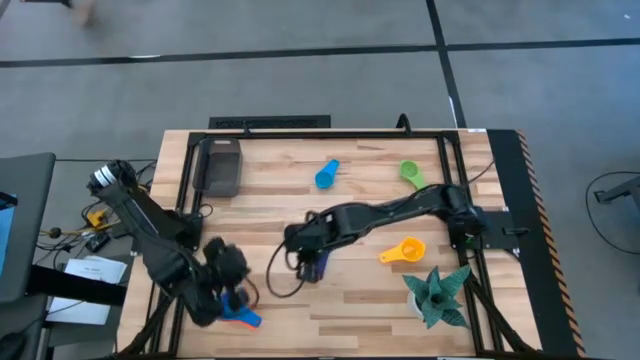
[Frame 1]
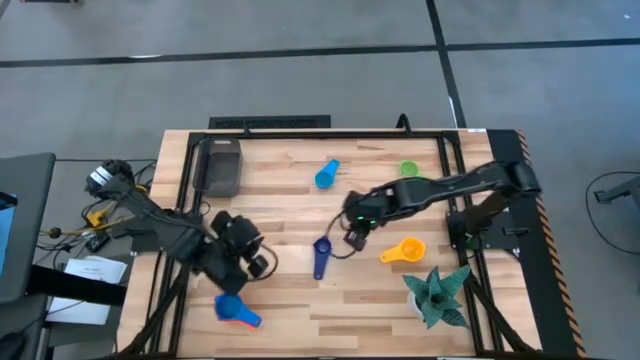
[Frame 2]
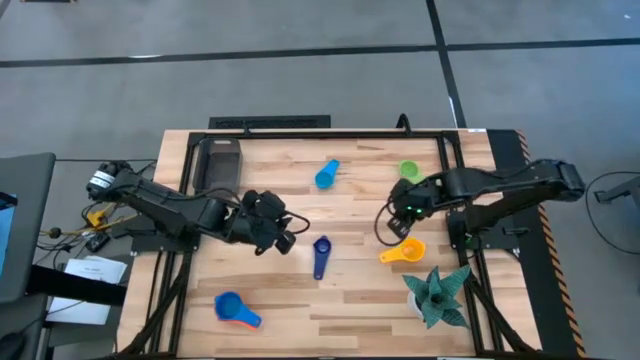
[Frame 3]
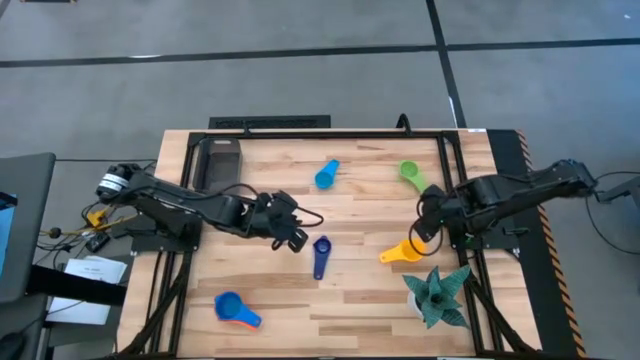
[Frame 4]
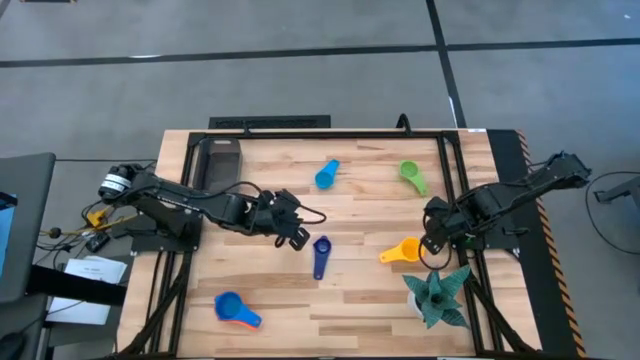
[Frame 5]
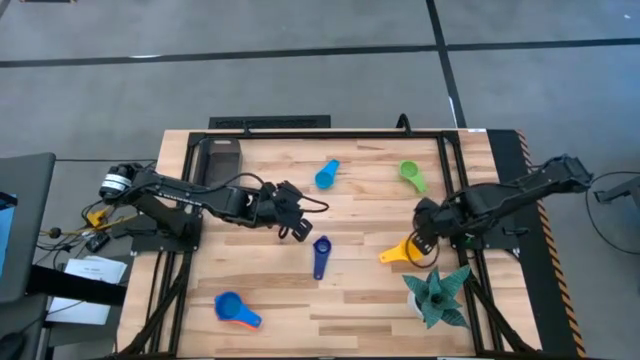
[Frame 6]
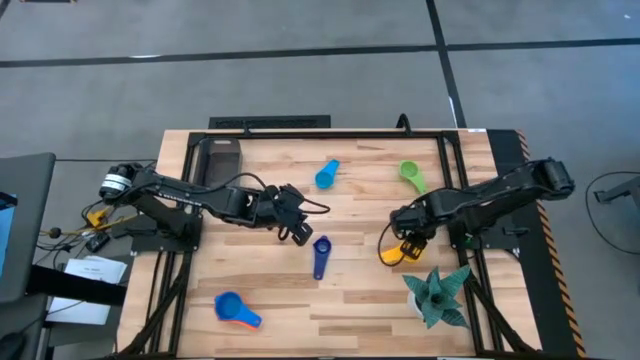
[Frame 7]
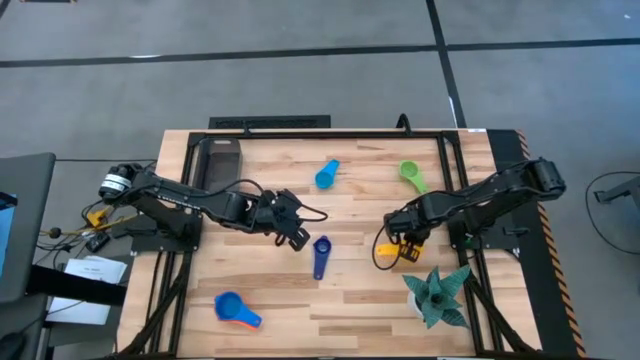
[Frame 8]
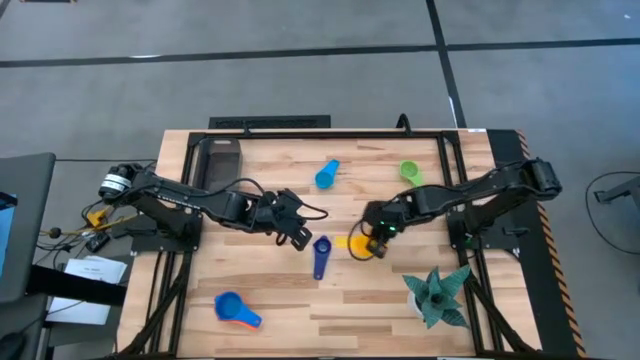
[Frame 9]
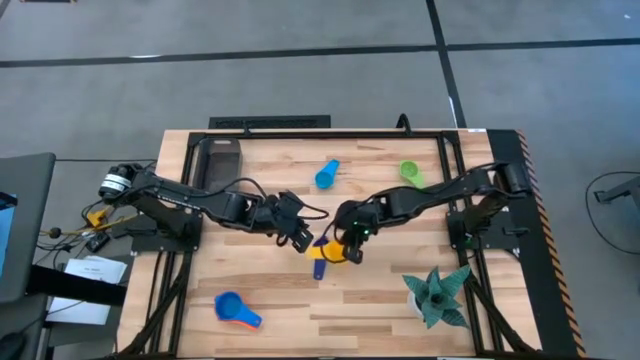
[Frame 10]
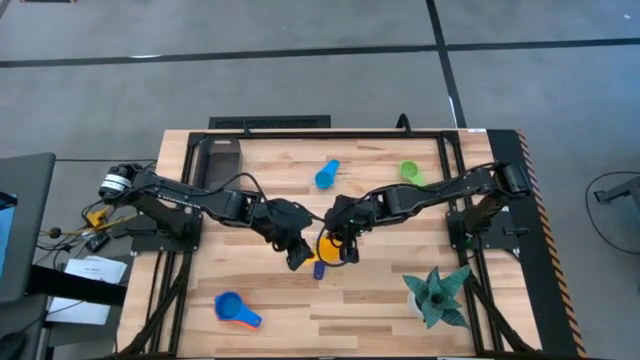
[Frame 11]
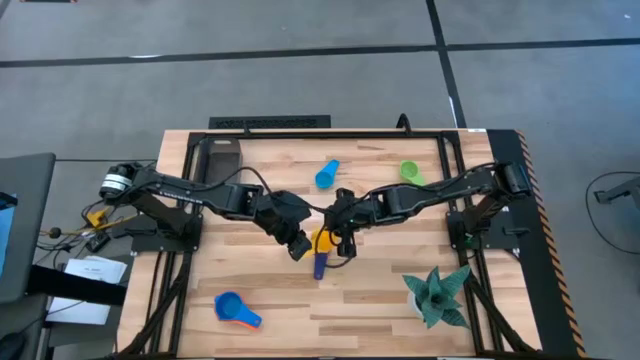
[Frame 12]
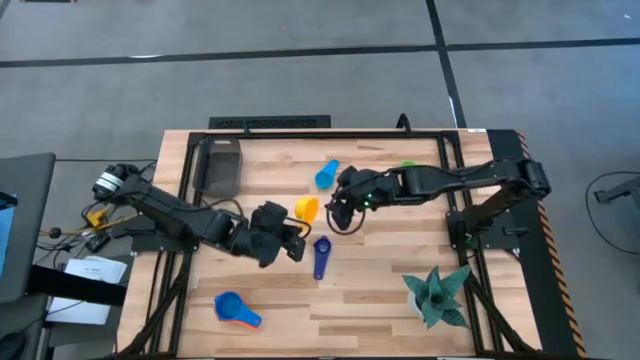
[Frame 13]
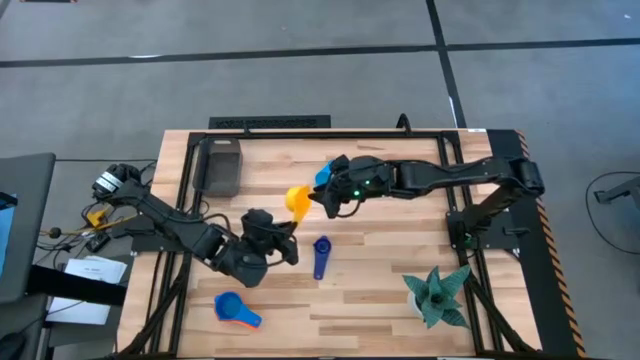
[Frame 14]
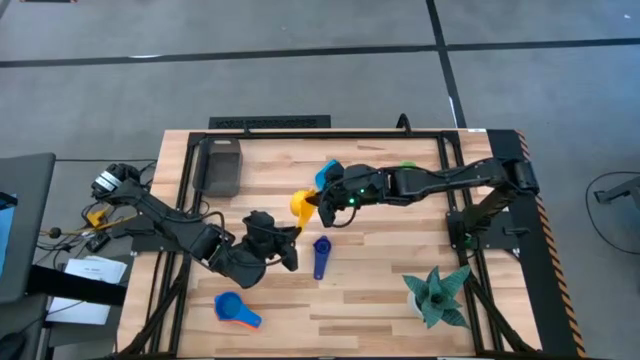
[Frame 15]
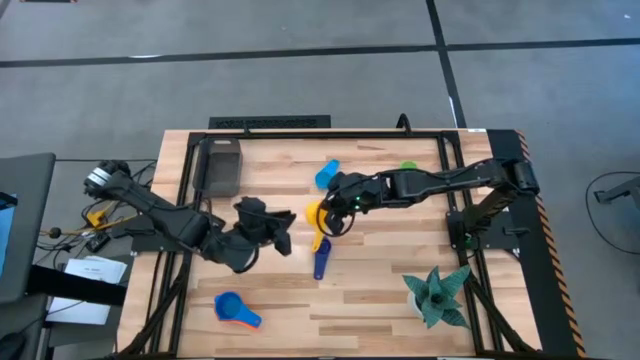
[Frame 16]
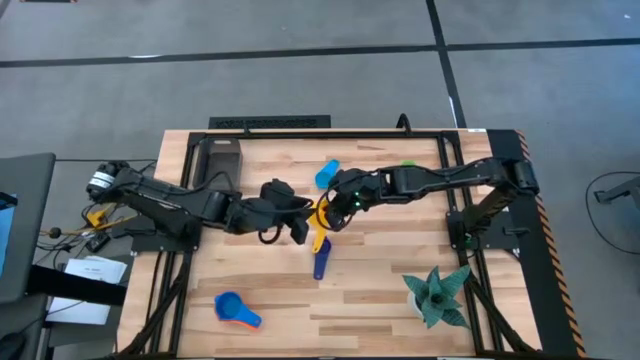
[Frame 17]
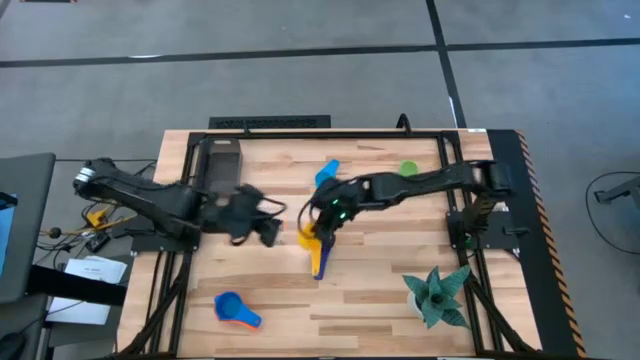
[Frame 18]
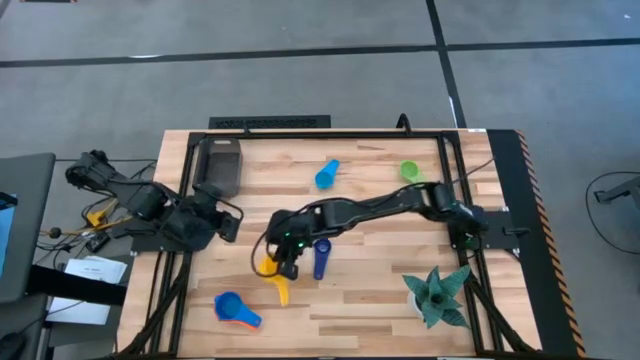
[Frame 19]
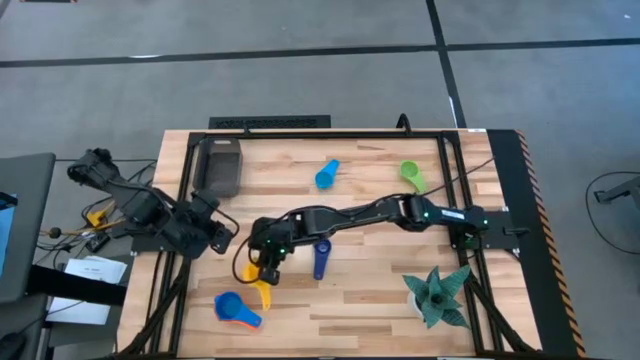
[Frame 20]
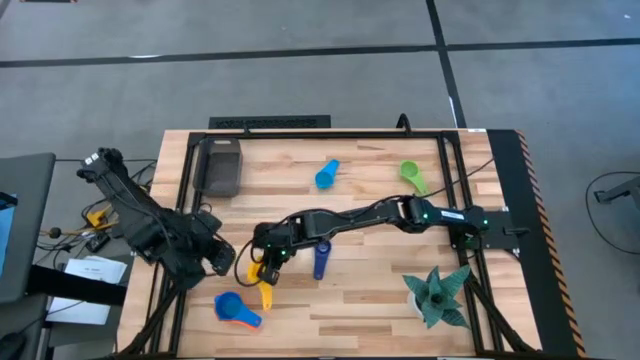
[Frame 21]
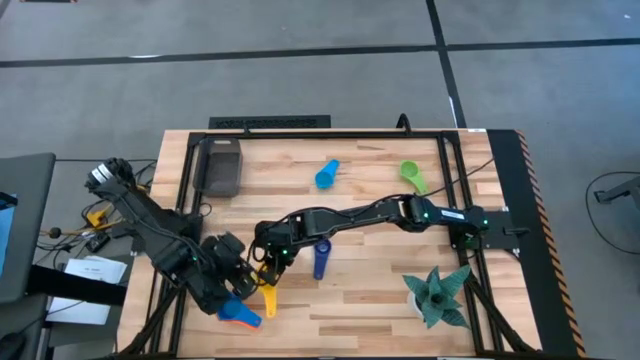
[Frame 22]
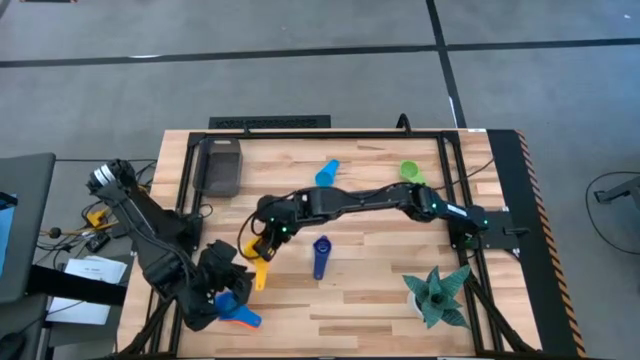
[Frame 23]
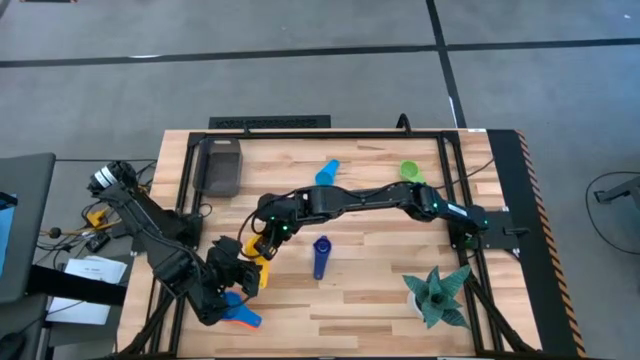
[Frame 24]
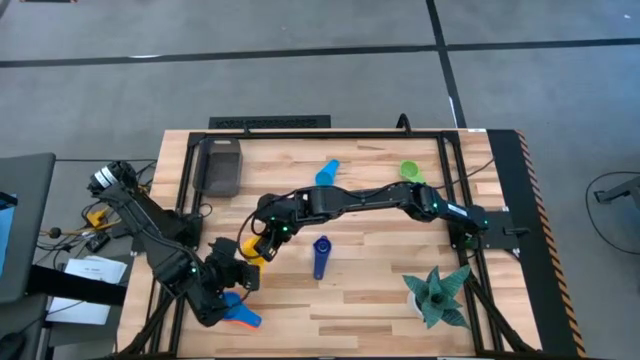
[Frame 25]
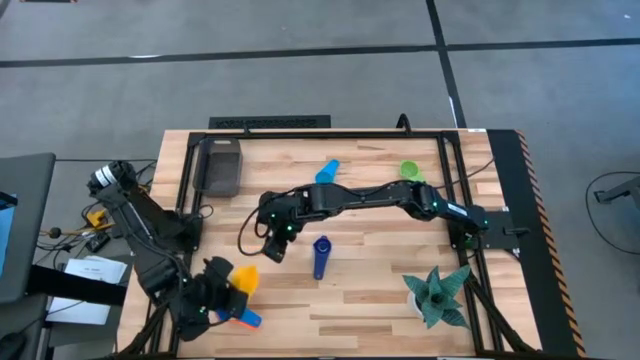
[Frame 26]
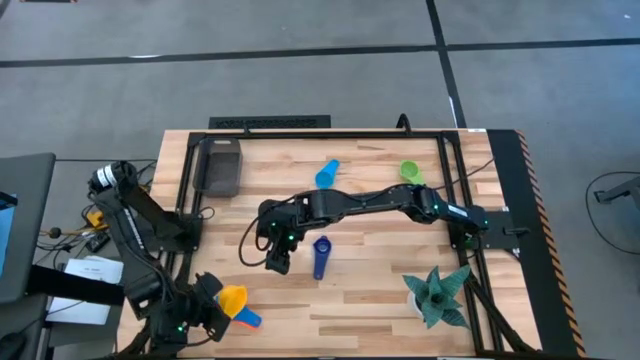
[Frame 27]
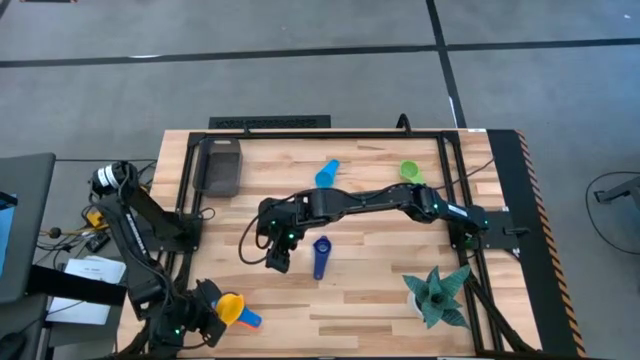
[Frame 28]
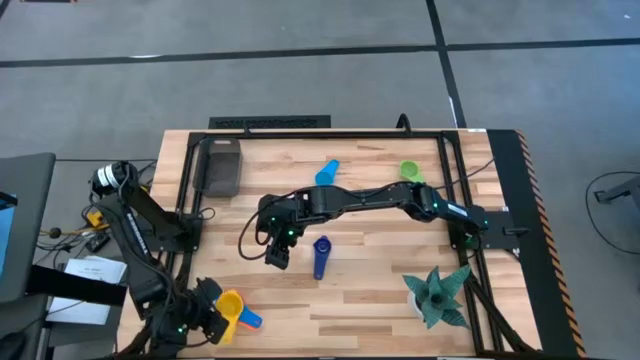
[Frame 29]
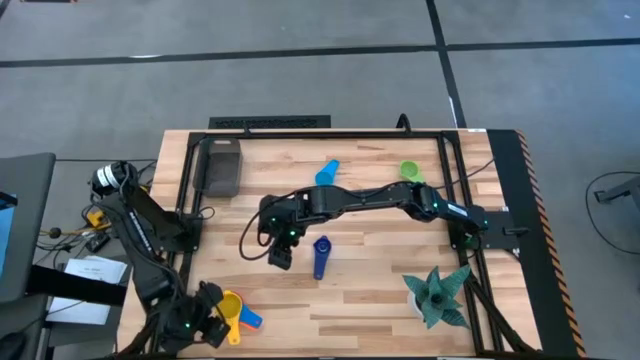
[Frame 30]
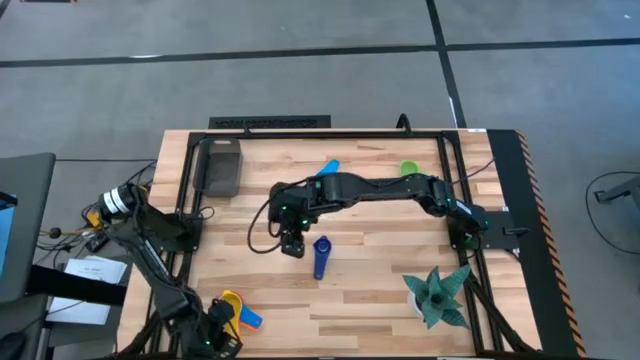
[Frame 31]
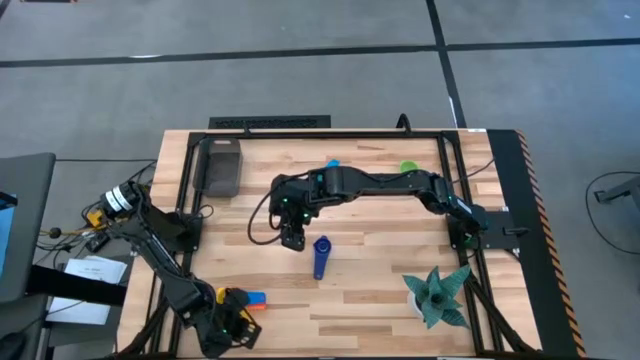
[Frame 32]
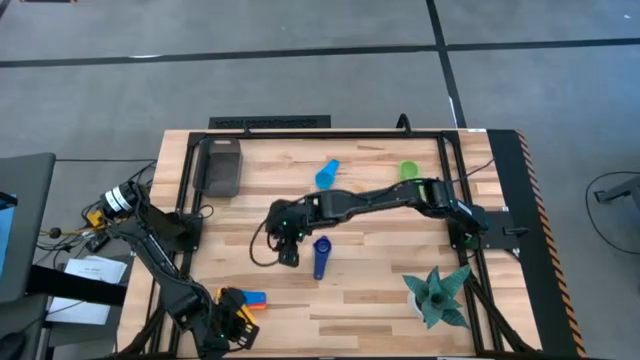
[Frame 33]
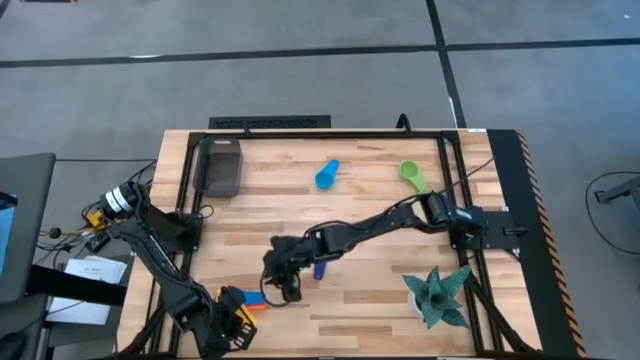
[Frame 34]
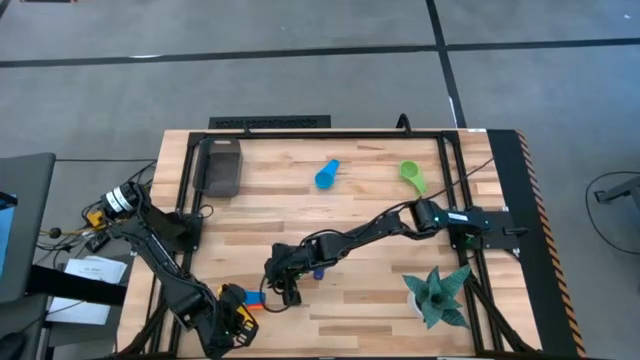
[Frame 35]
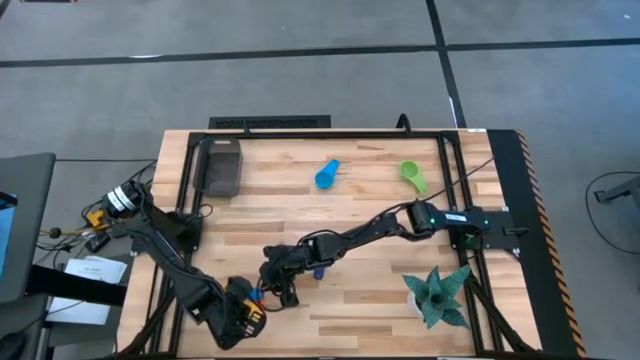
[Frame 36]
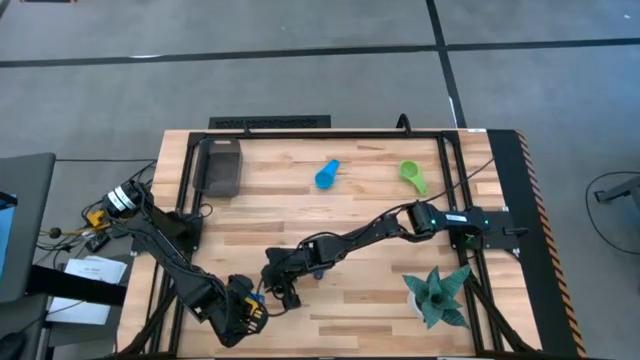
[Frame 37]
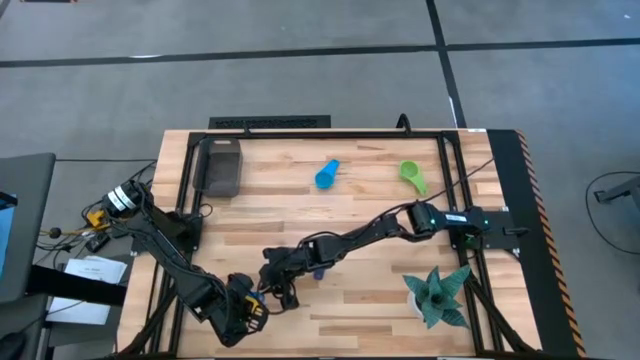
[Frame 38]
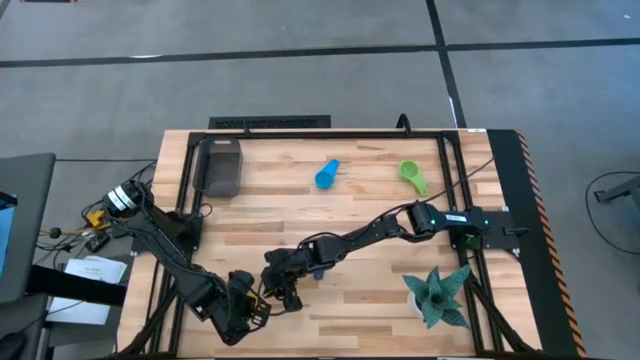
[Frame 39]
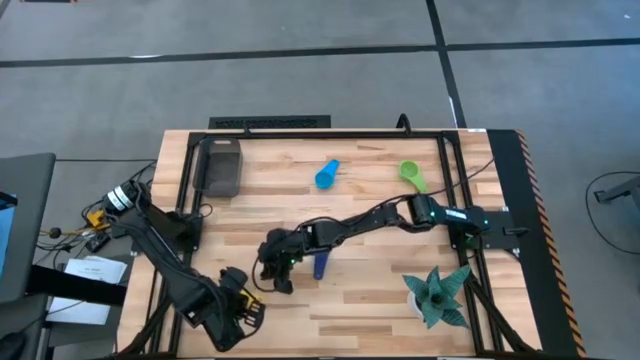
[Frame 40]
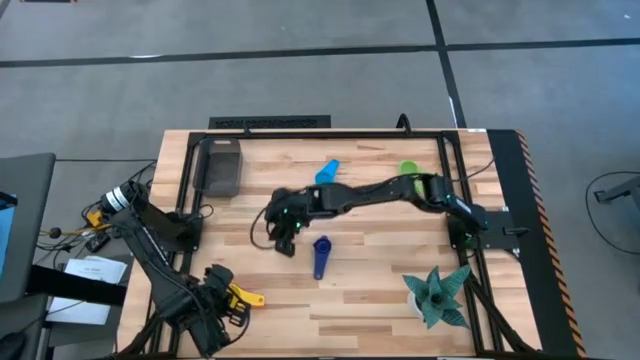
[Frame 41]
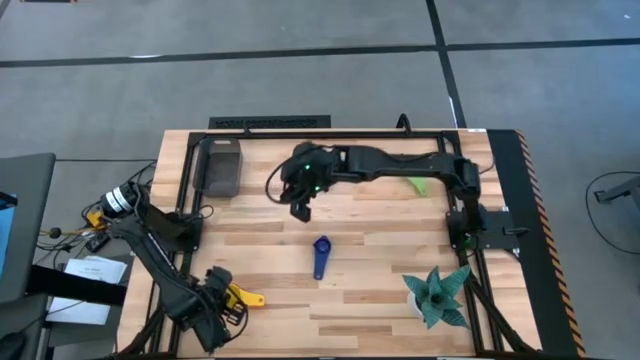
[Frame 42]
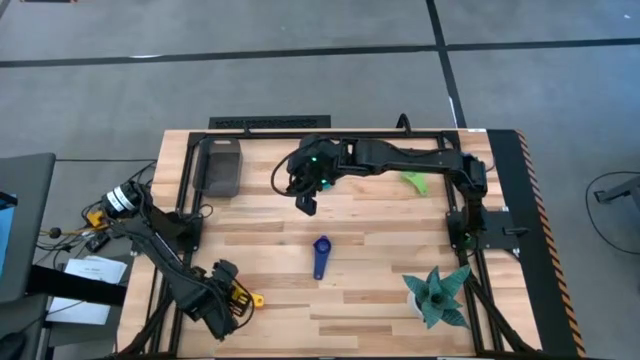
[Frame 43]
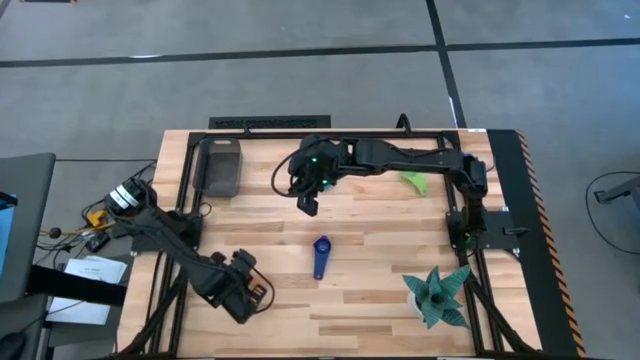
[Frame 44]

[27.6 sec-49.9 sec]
Task: Nest measuring cups in basket
Stack the yellow measuring cup on top of the blue measuring cup

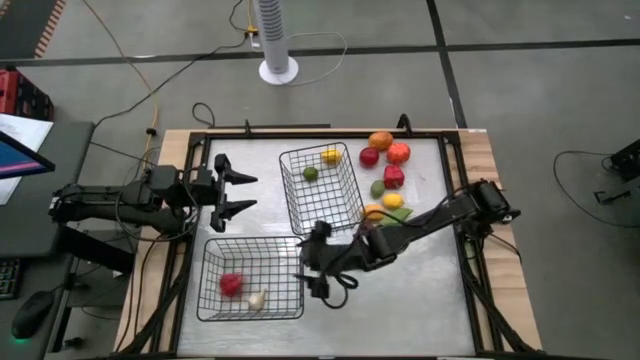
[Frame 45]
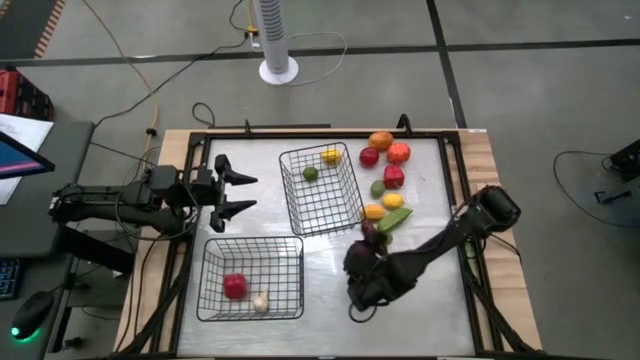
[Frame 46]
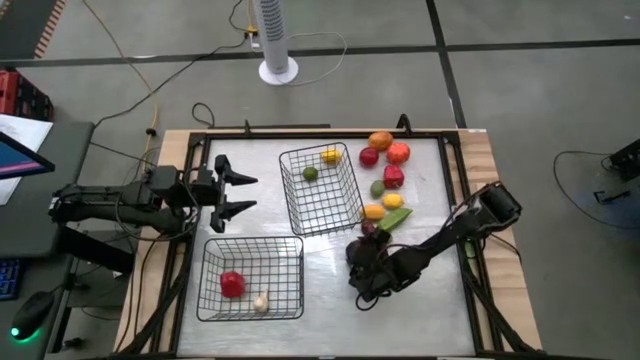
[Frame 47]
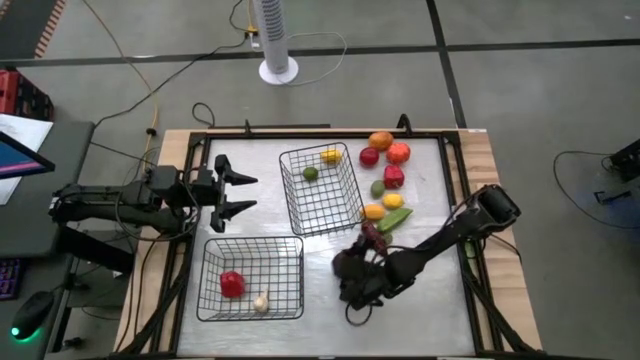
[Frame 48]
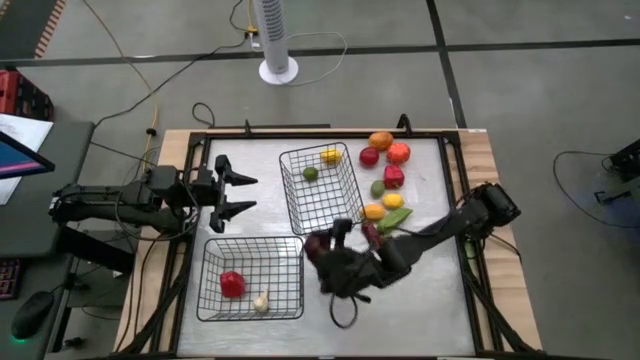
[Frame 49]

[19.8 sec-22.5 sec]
Task: Sort produce into baskets
Put the red apple into the top black wire basket
